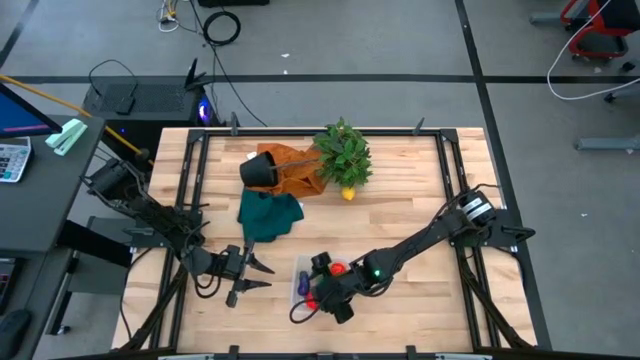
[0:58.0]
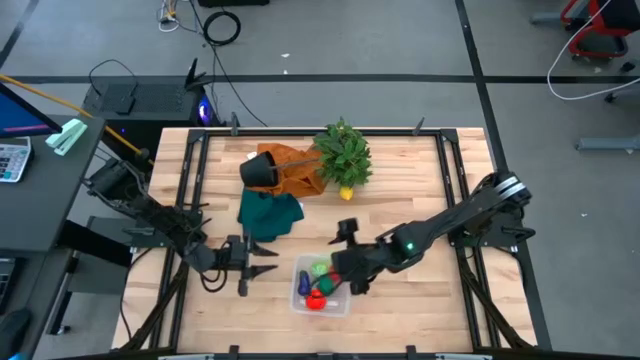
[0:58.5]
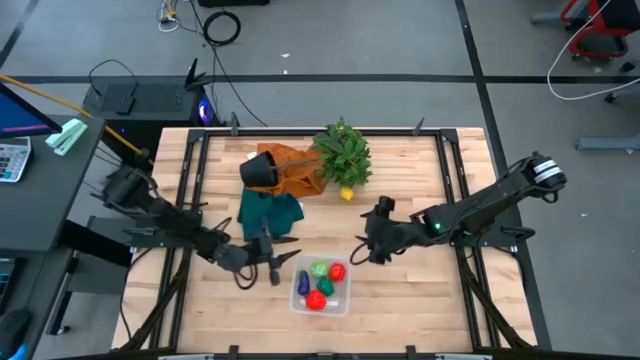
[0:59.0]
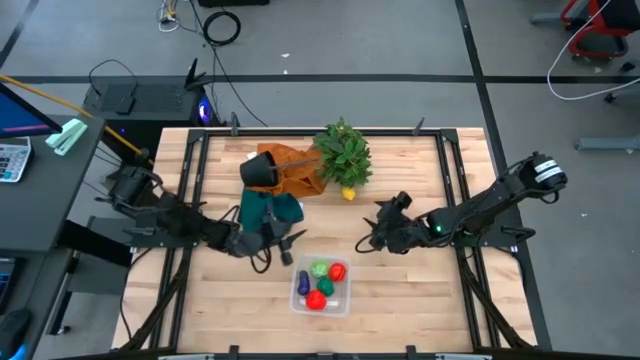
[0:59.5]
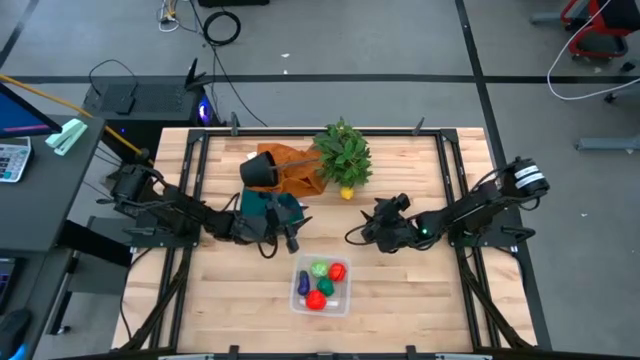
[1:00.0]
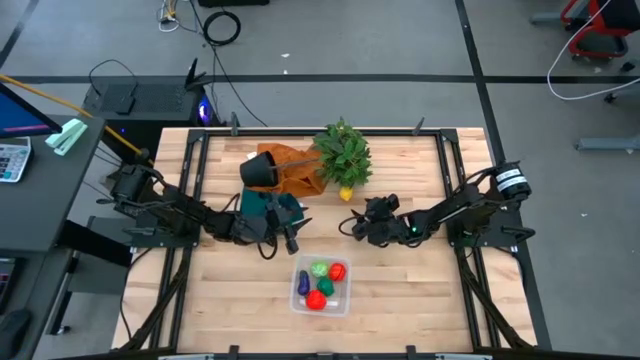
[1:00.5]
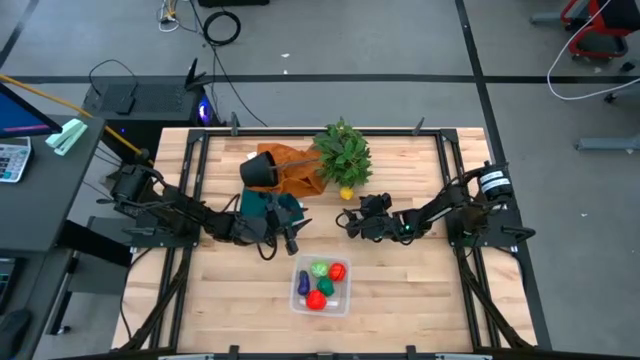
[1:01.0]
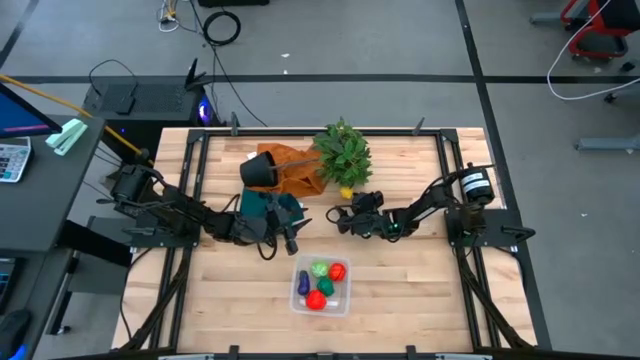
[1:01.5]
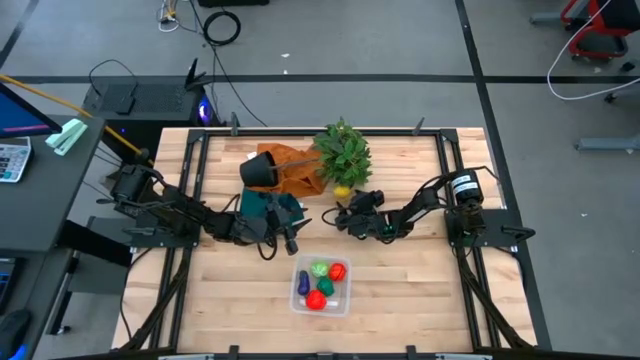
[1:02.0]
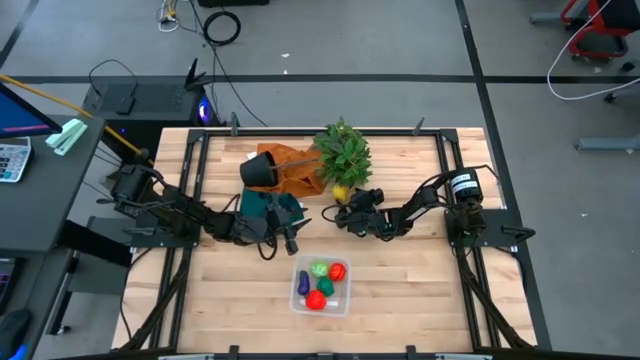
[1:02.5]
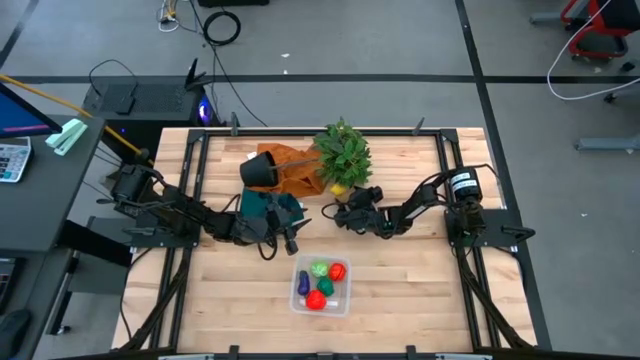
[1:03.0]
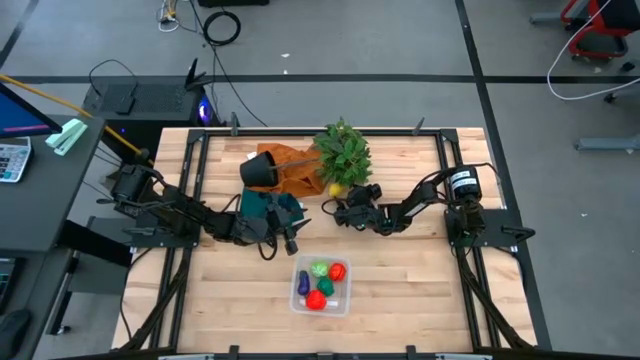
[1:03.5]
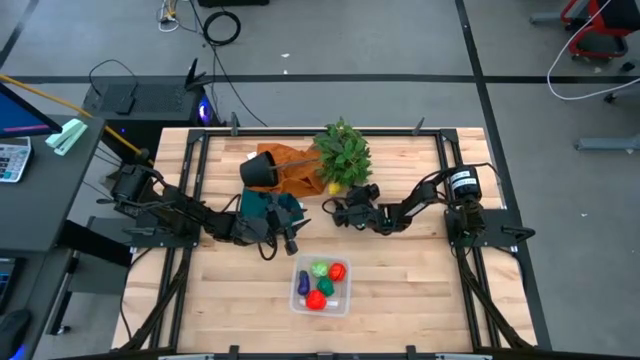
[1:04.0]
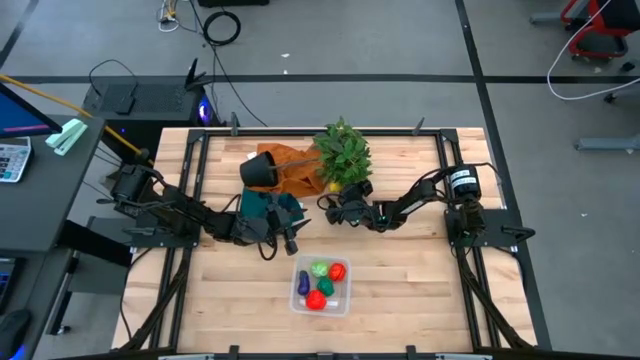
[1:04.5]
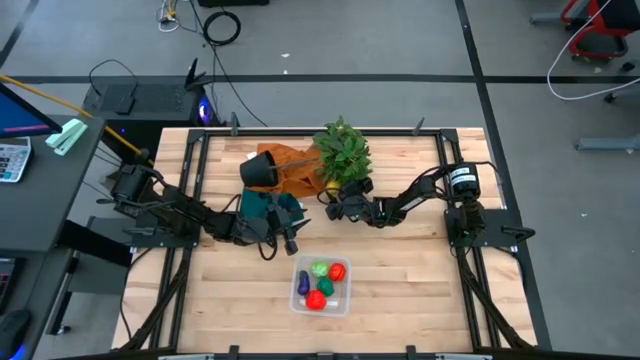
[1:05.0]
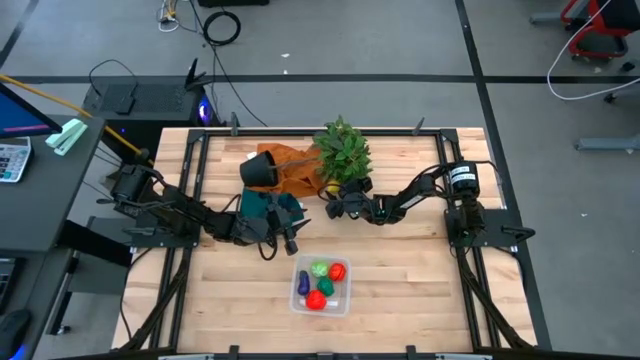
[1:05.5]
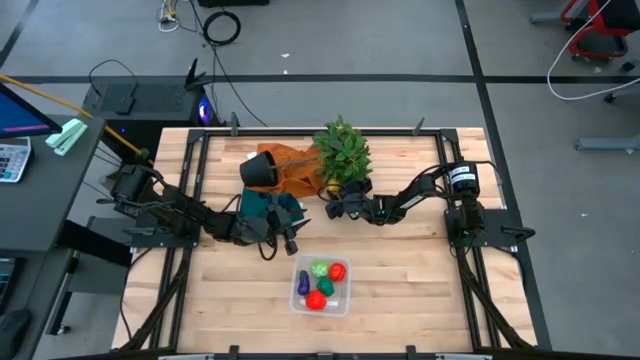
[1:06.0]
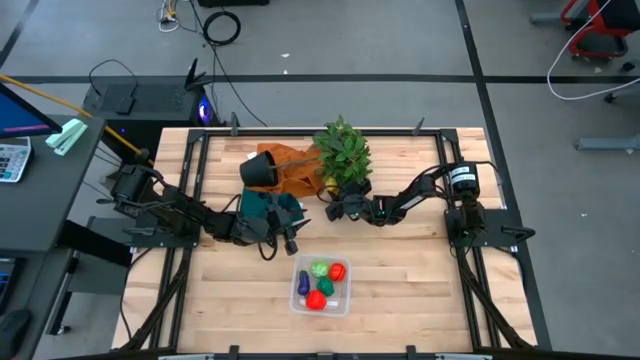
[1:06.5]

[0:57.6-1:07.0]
Task: Pick and placing Produce into tupperware
Put the yellow lemon into the transparent bin

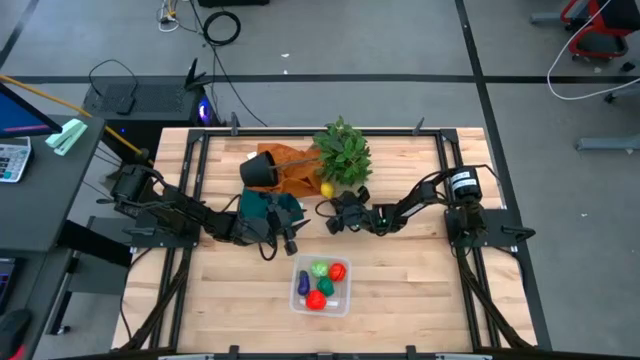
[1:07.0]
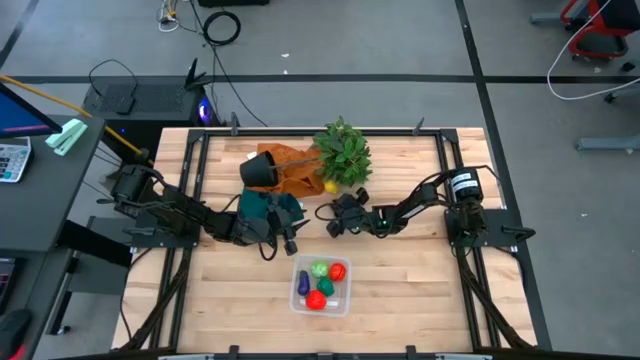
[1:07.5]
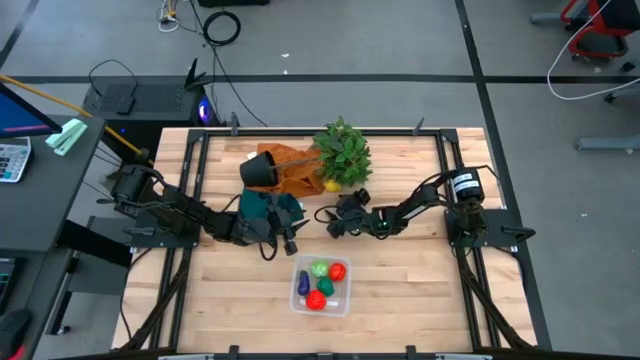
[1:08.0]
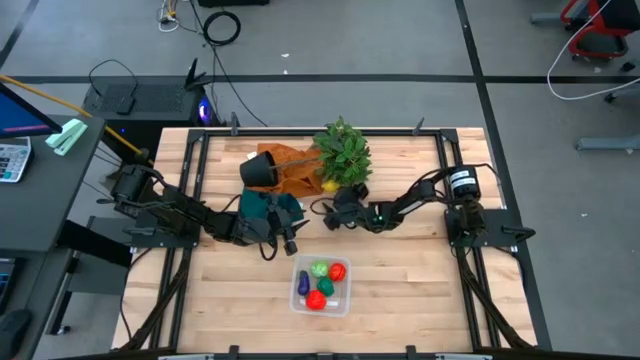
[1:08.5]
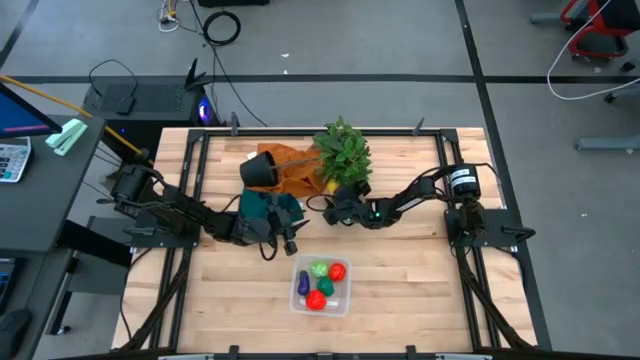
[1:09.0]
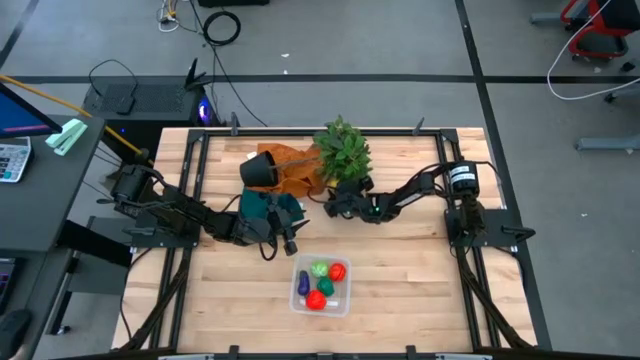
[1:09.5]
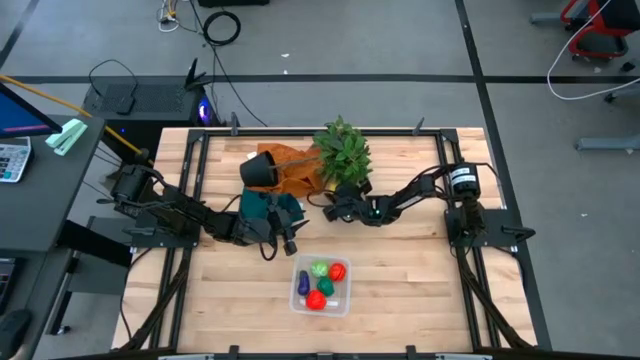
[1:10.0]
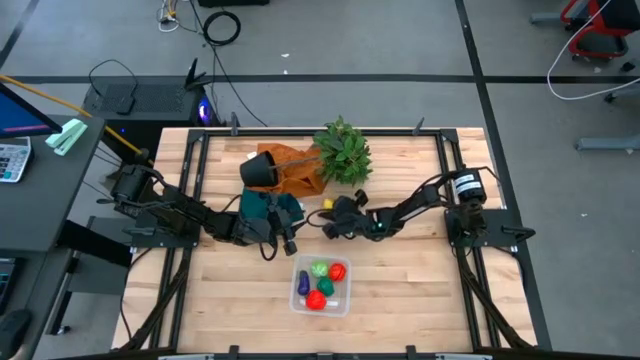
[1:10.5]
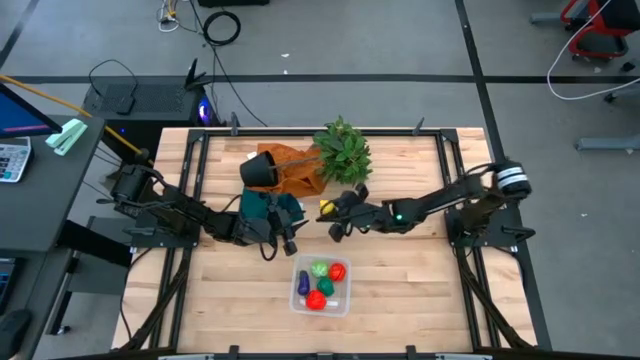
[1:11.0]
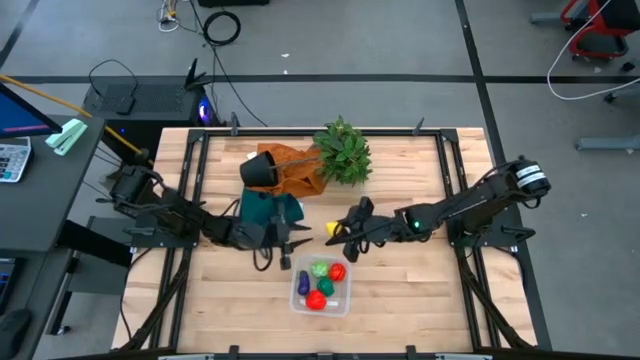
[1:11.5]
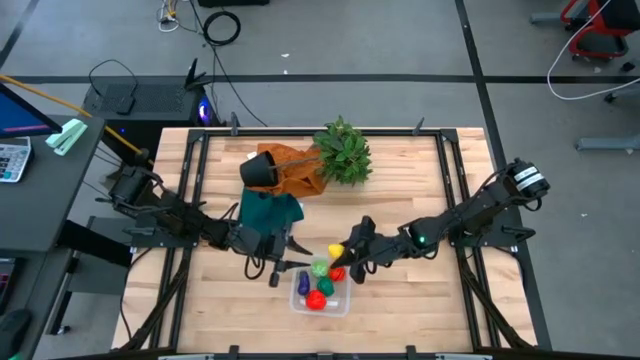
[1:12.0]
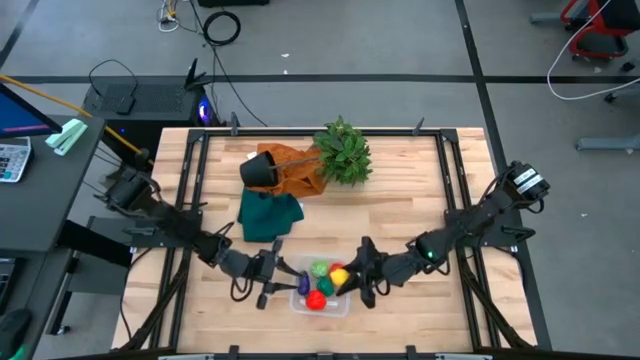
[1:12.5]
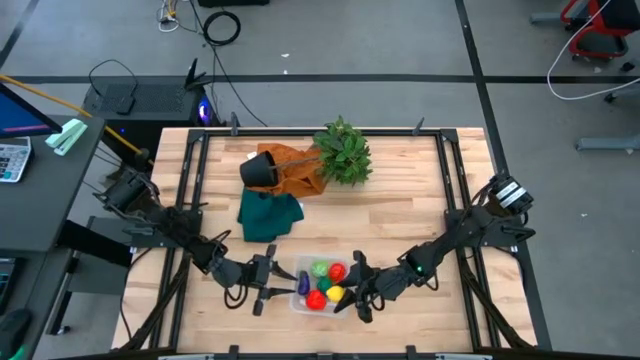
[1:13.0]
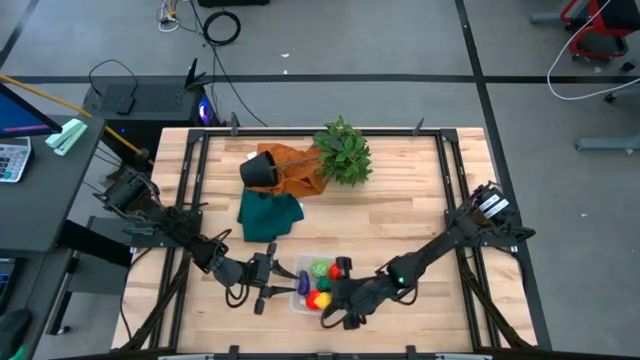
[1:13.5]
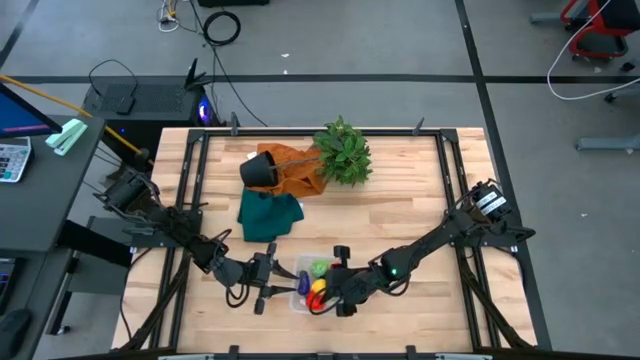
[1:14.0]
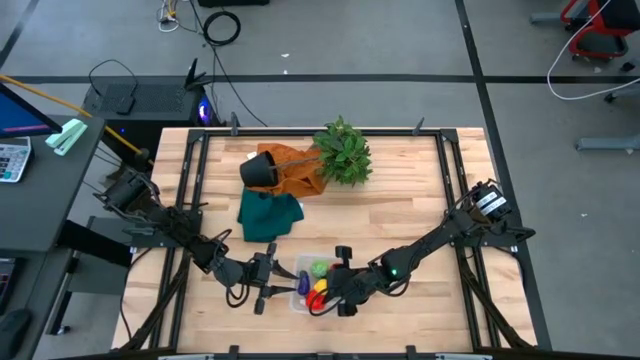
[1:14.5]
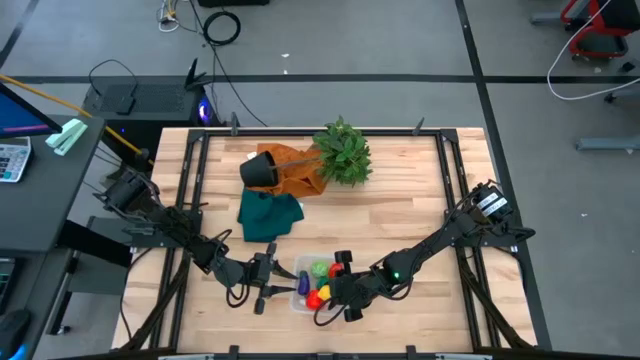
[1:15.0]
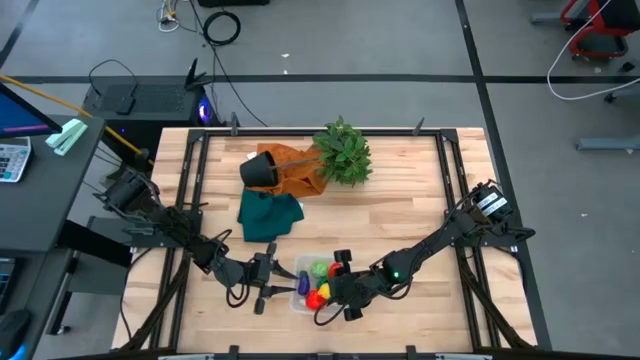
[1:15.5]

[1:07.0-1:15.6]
Put the yellow lemon into the transparent bin

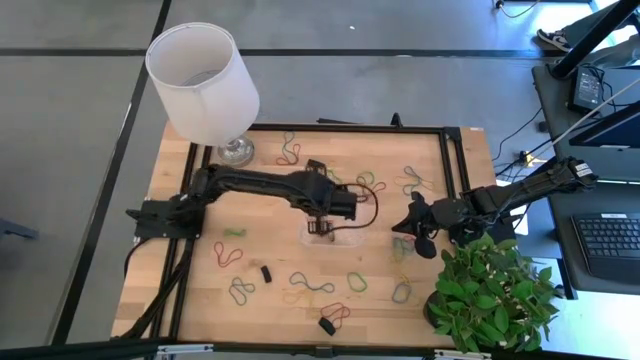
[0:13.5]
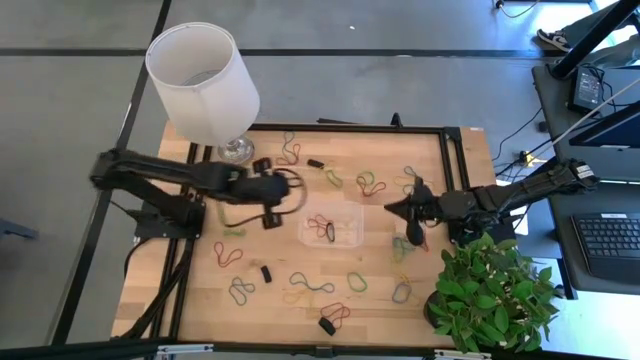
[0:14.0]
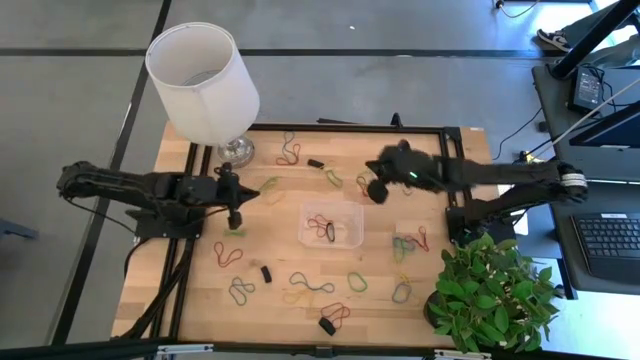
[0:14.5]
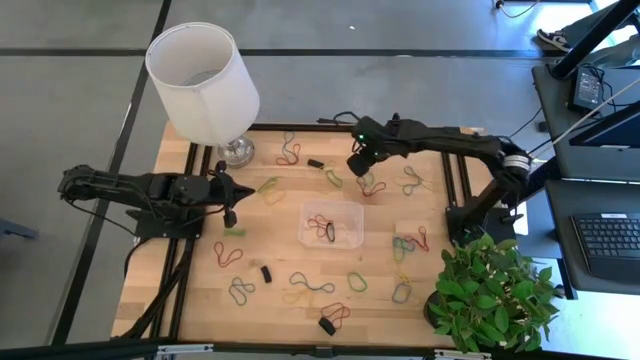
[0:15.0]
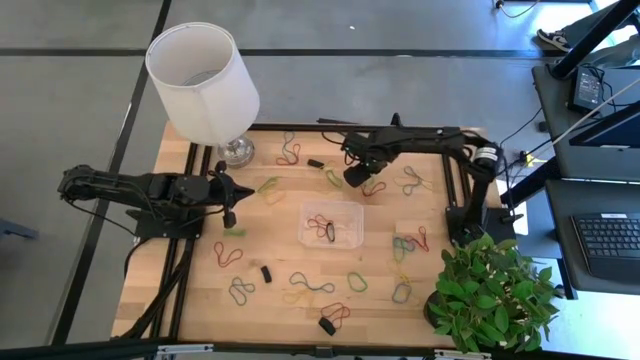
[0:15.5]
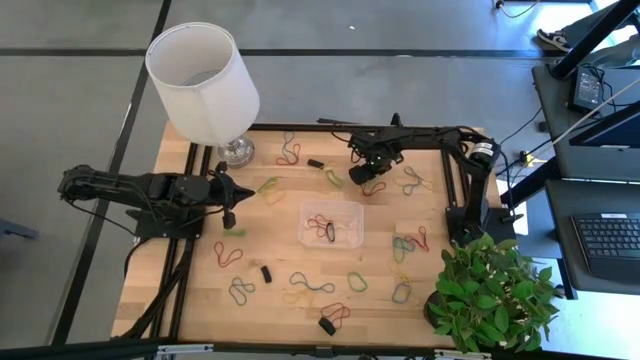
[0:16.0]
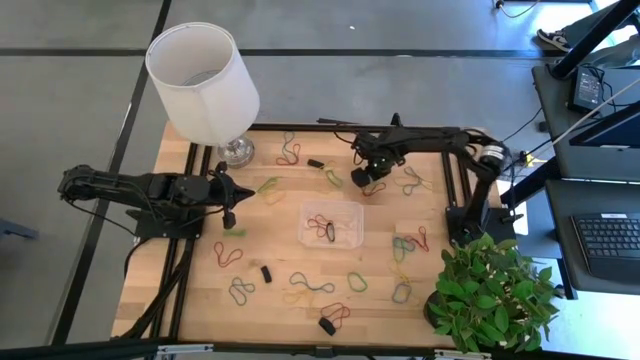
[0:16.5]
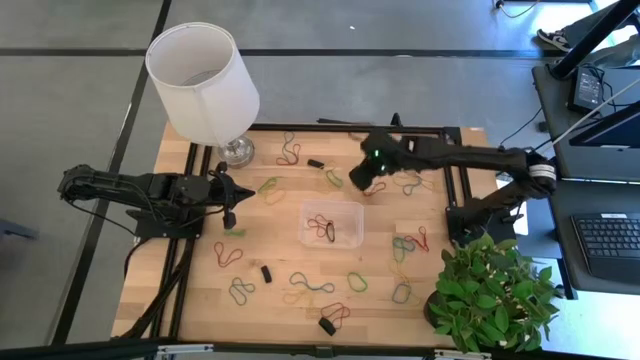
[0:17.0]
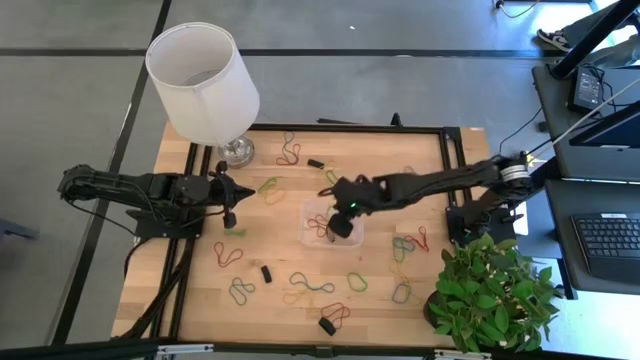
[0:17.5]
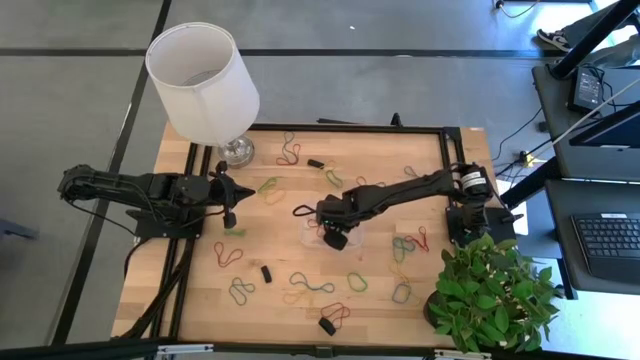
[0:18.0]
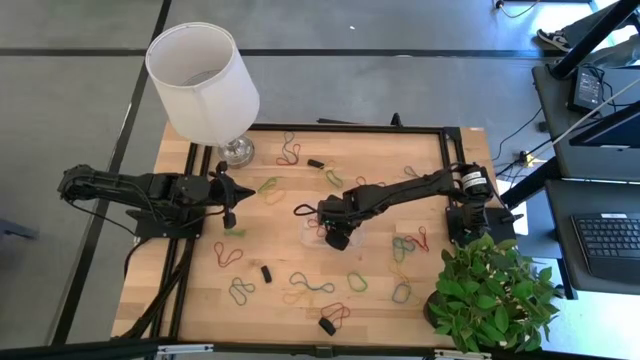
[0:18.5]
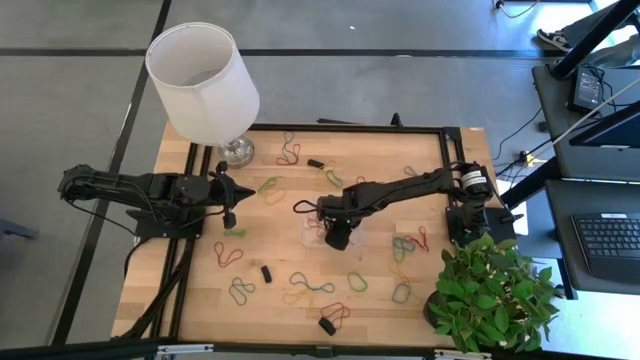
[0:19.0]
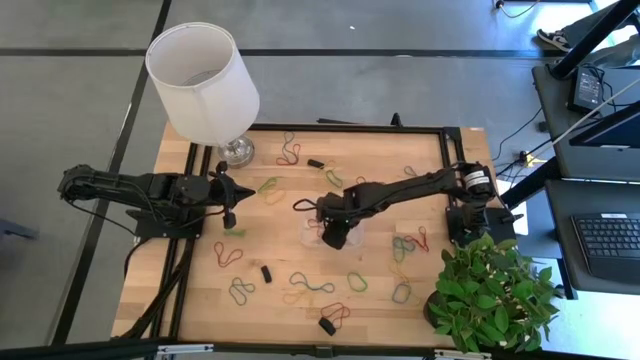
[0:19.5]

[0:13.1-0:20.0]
Task: Pick and place rubber bands into bin
Put the green rubber band into the transparent bin
